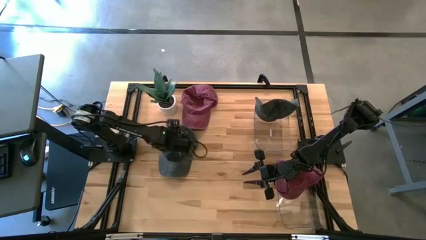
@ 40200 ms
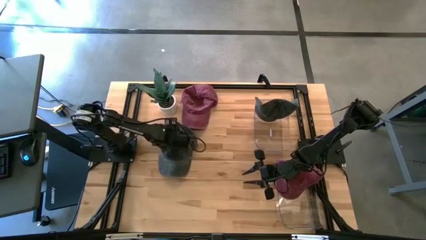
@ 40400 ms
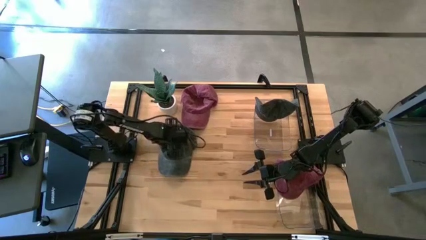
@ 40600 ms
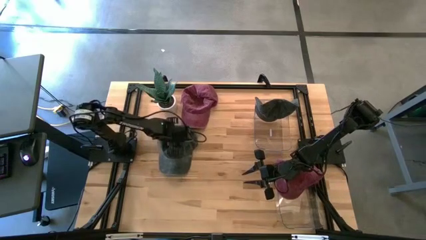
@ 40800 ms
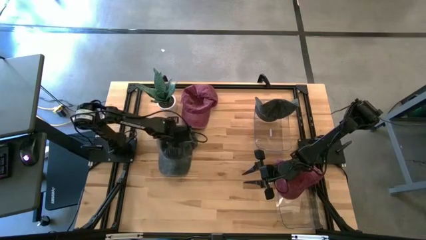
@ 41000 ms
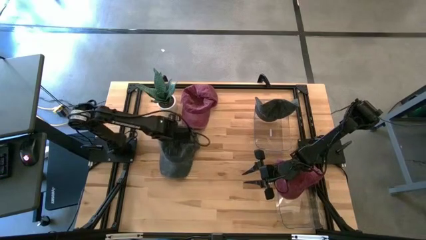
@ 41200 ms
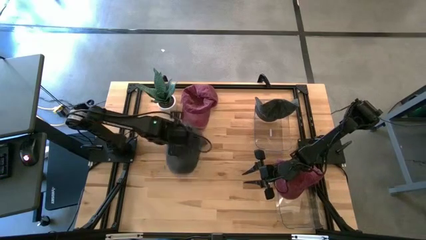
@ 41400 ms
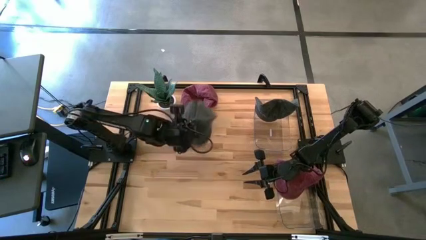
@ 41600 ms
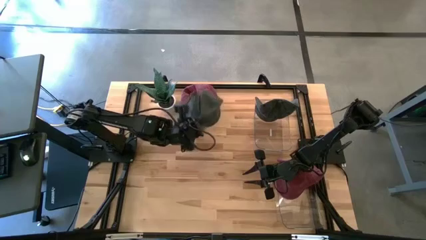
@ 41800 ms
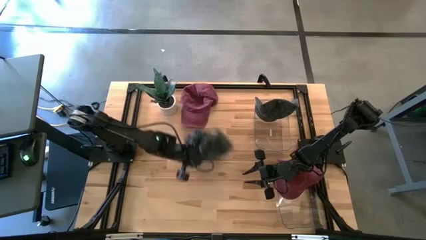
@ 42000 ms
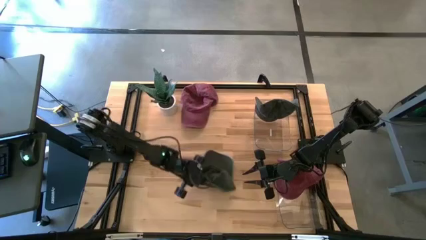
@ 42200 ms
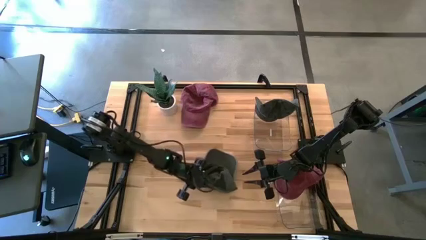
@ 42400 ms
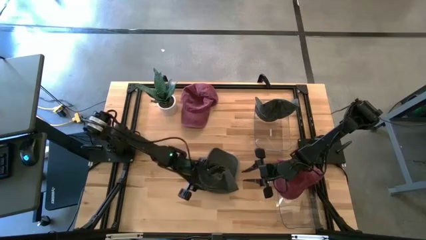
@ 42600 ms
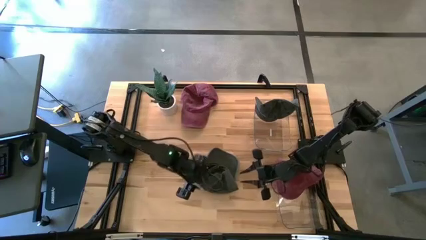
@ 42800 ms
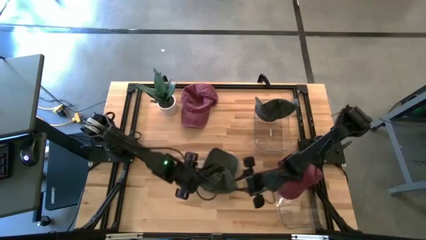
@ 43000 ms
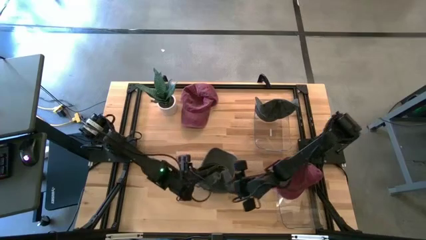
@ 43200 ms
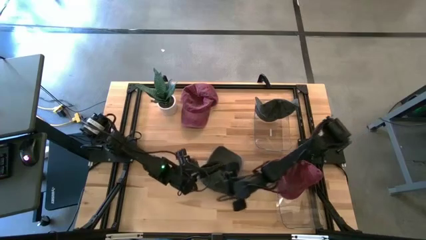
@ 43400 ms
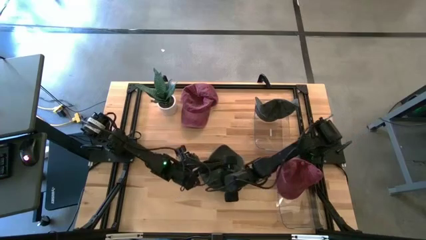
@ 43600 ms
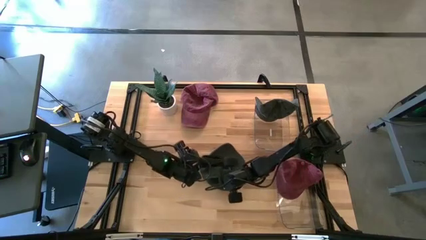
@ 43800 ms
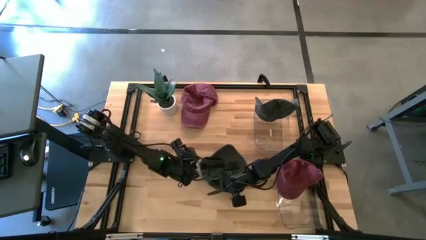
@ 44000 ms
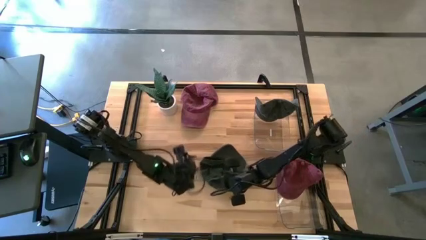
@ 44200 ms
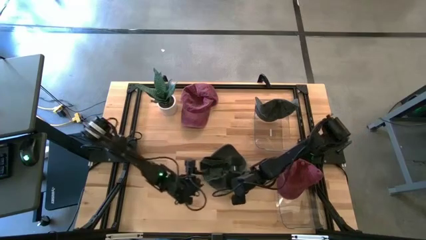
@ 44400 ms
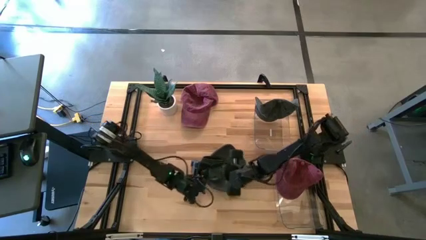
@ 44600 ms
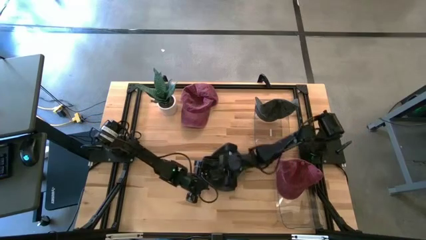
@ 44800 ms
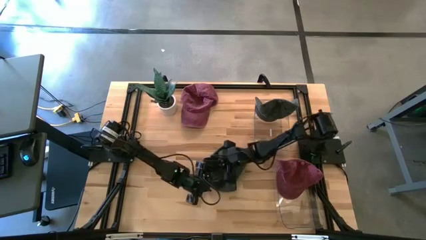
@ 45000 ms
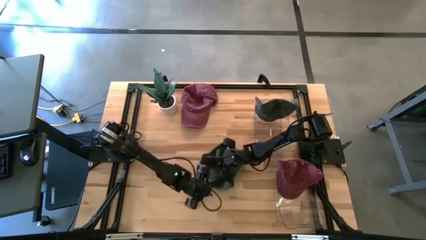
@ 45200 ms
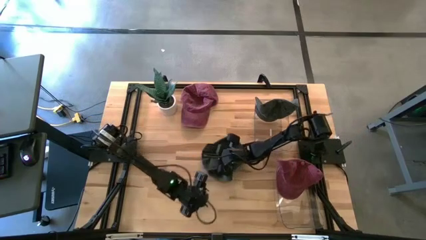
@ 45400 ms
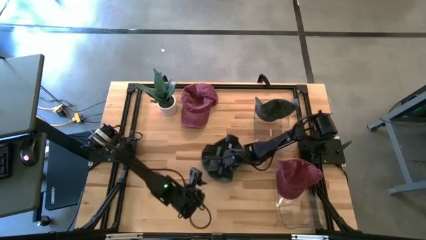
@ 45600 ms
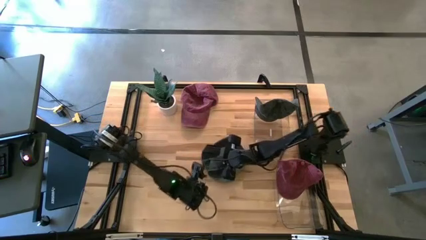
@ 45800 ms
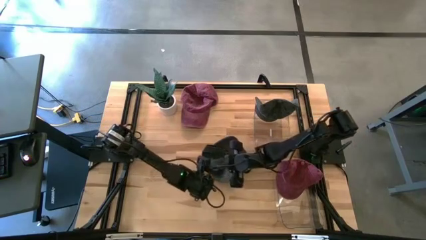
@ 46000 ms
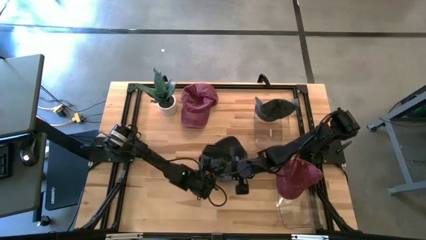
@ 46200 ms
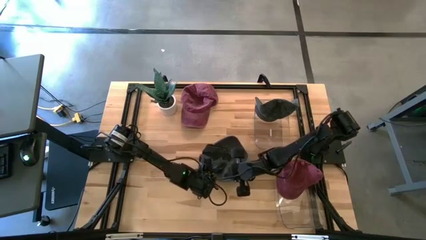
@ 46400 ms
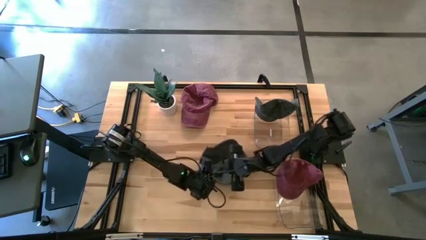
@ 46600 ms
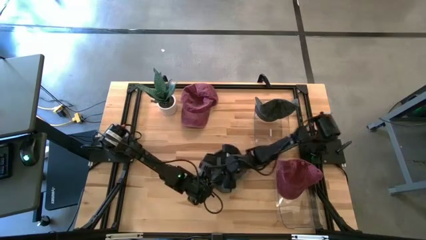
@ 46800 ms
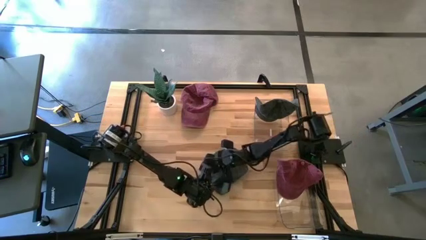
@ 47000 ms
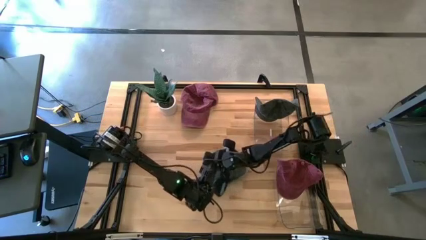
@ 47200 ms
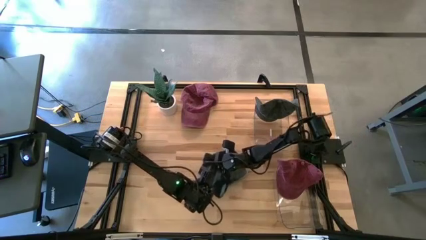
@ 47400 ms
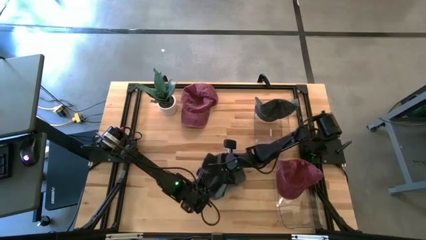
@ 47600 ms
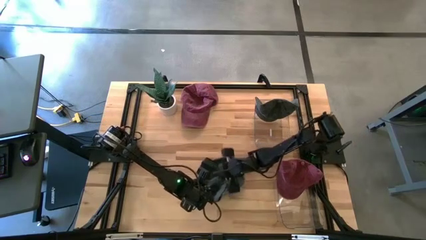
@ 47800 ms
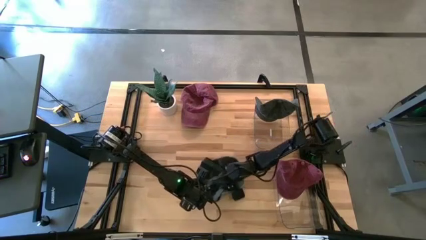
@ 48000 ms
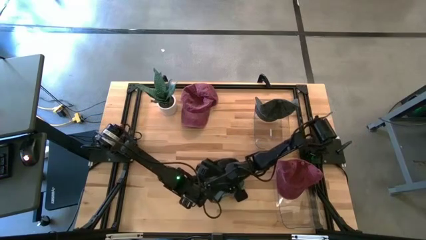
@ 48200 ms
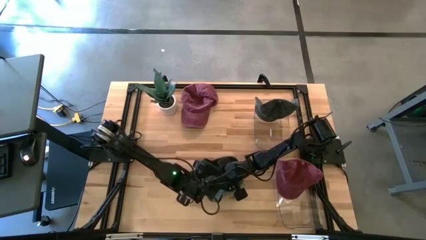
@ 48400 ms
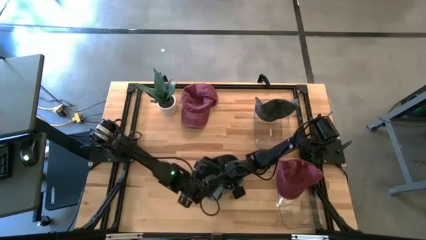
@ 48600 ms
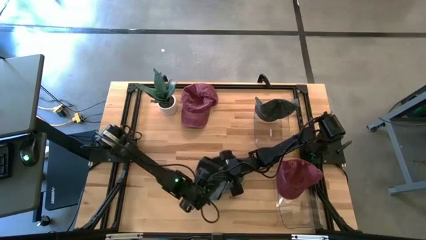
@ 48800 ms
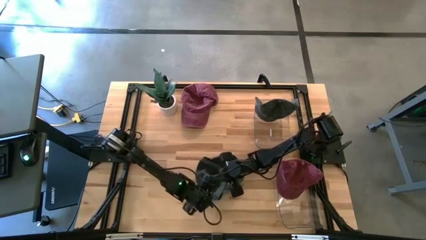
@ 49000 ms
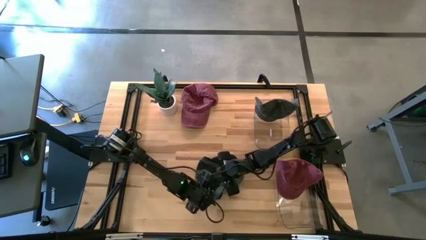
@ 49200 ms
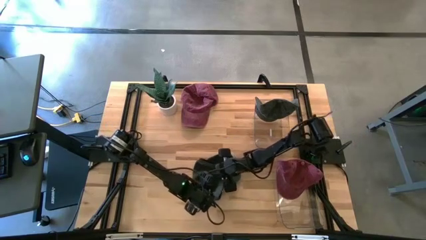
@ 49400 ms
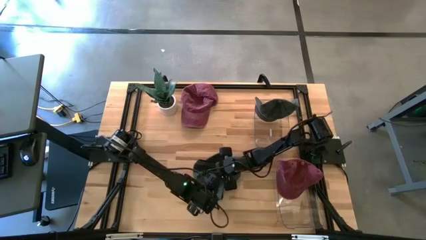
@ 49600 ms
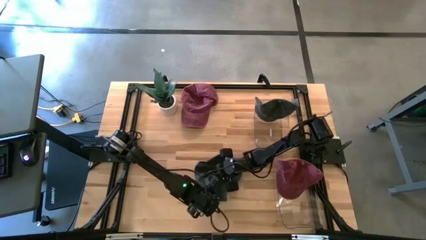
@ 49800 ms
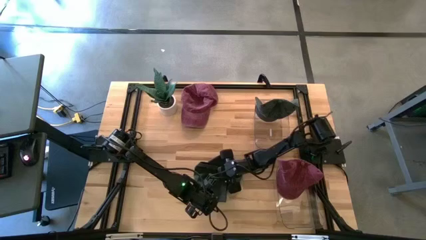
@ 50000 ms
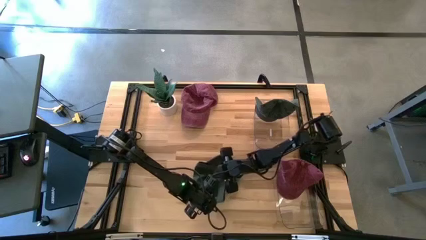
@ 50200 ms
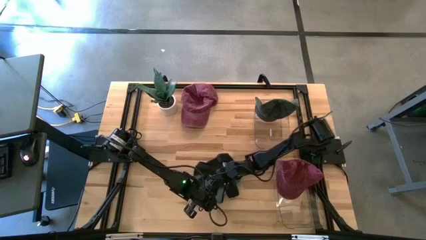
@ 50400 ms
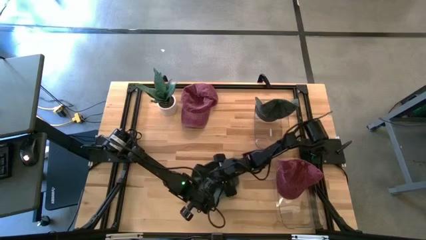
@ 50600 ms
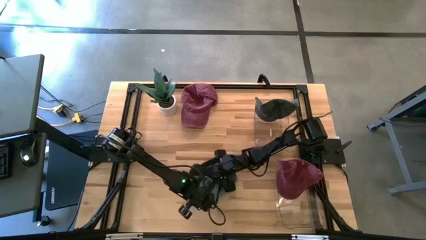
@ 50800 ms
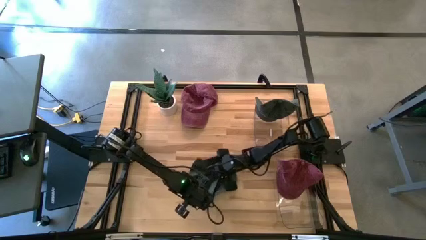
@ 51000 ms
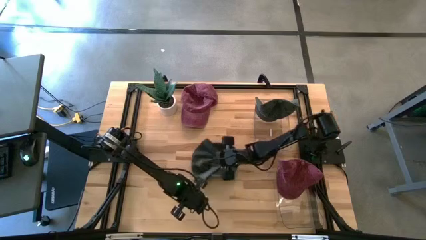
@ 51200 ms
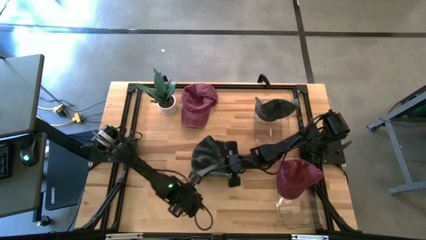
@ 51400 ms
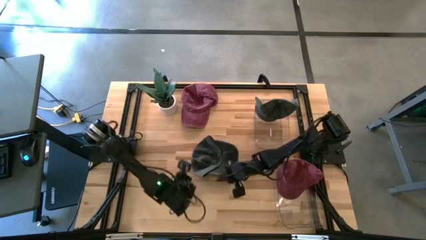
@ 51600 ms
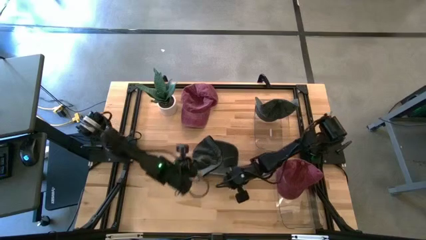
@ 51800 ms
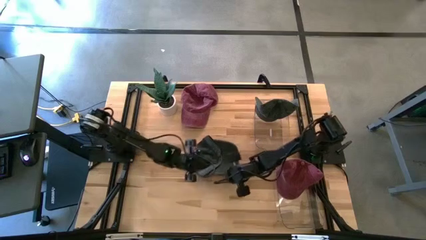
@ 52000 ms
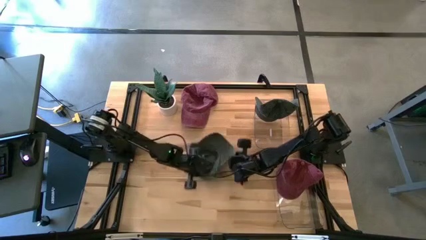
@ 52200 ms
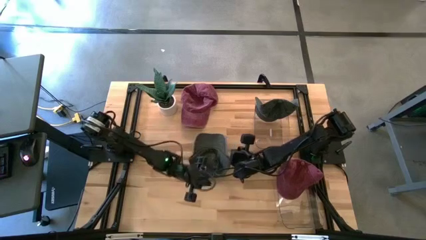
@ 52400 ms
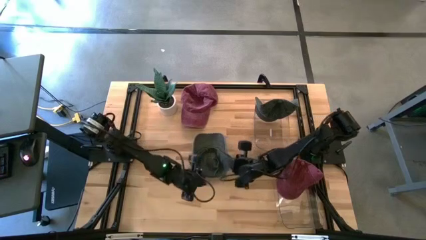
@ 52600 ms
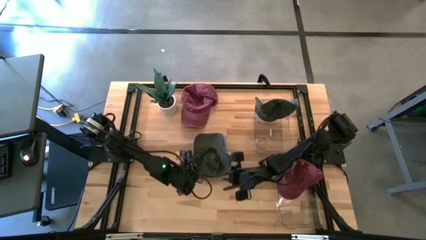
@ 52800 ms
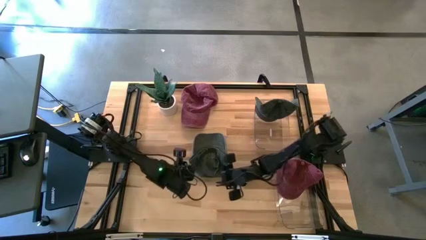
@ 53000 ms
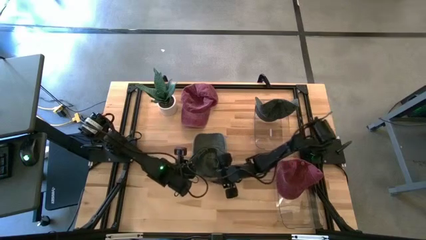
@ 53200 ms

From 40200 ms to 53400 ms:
Task: Pick & Place hat
Put the black cap into the top transparent bin
